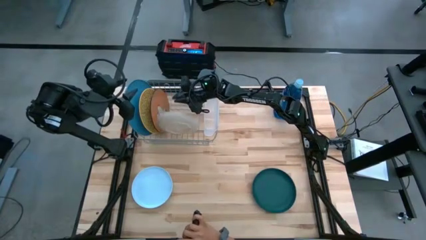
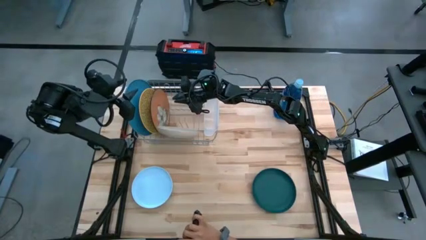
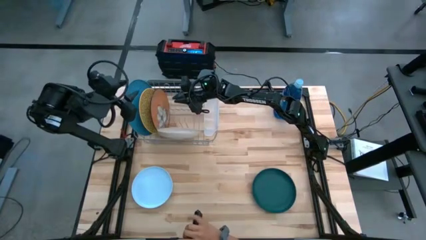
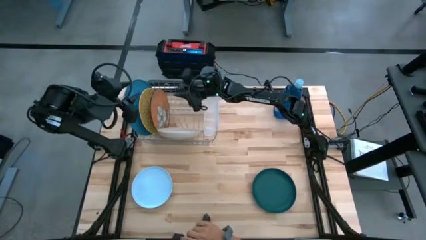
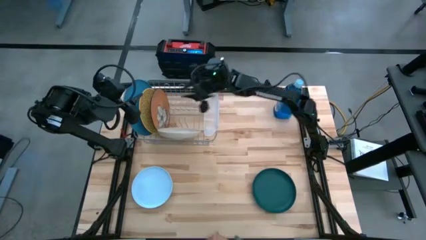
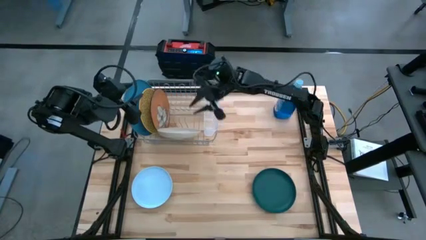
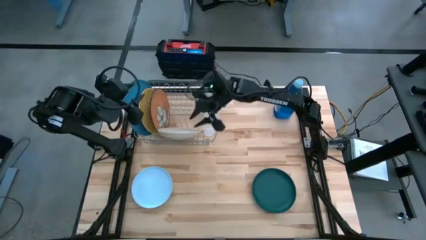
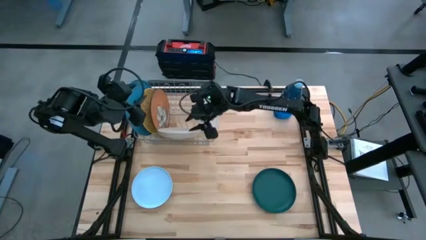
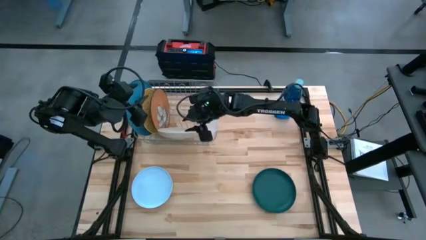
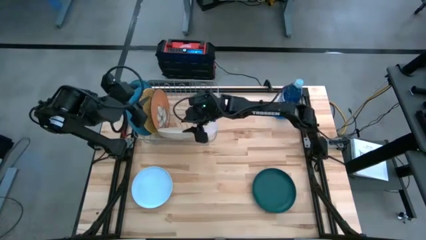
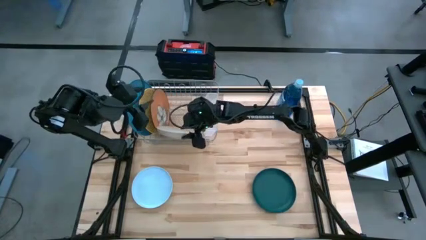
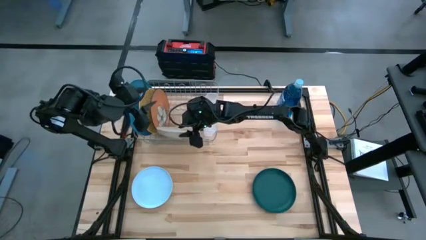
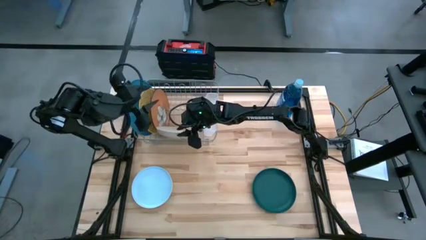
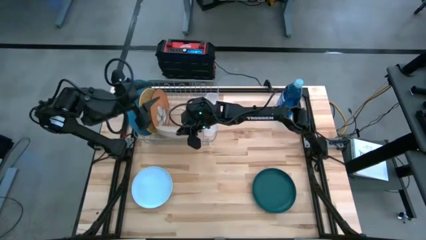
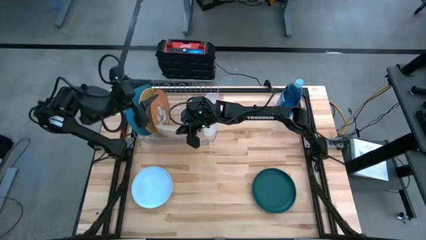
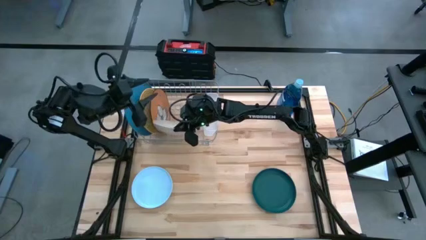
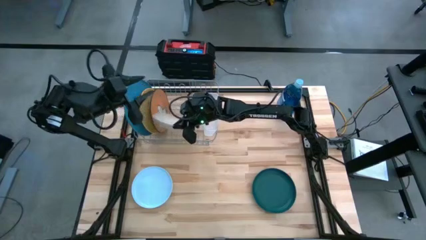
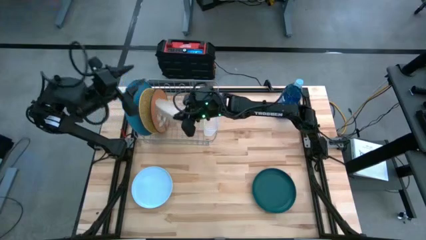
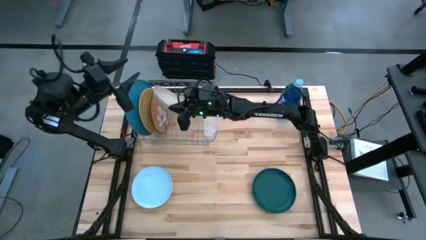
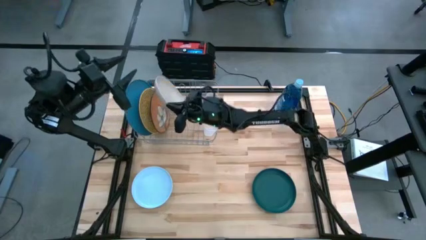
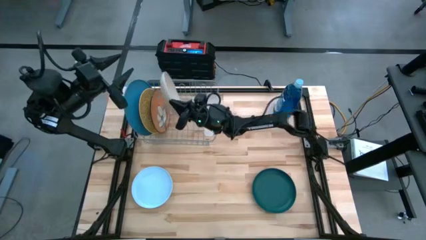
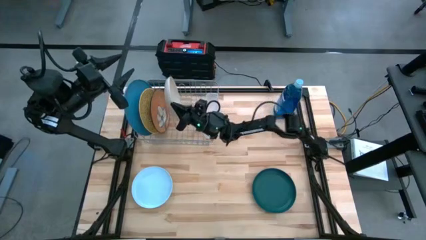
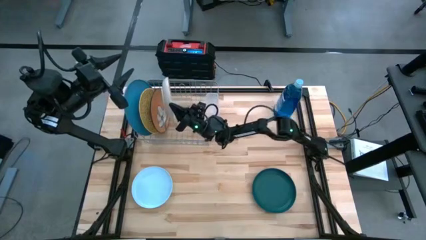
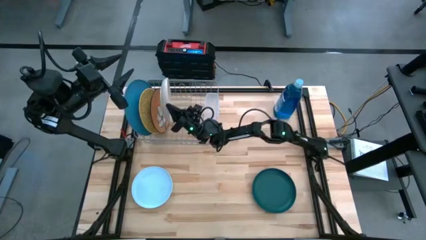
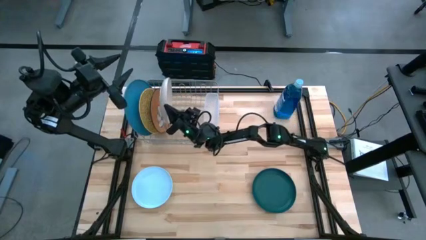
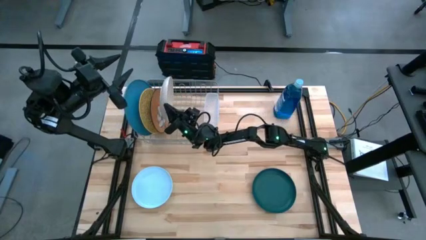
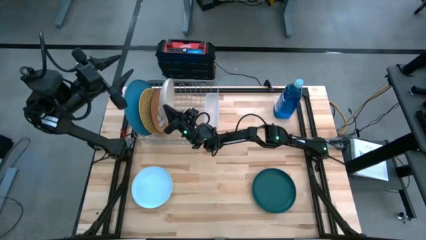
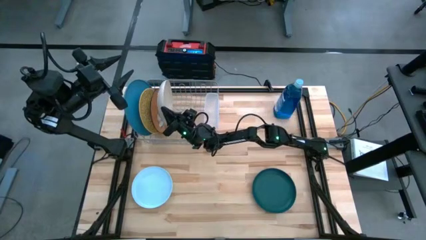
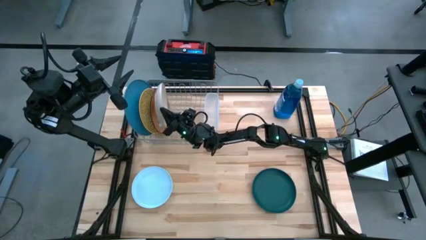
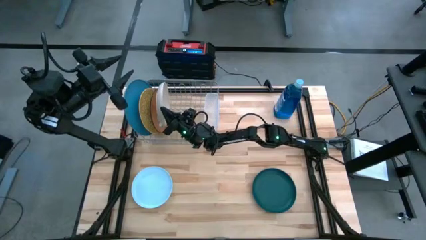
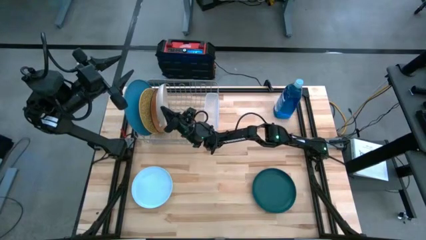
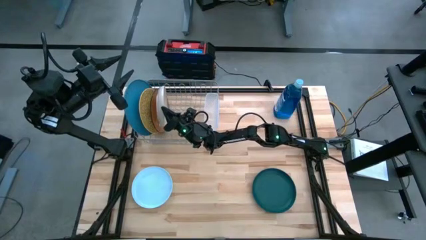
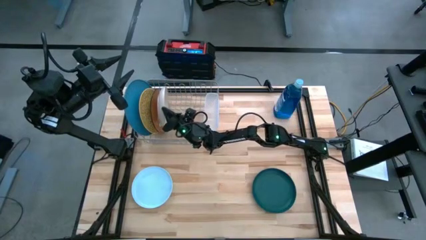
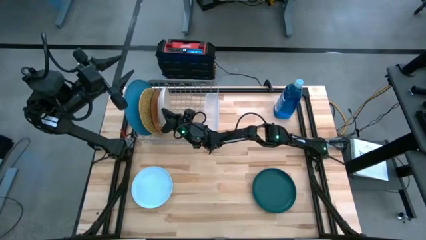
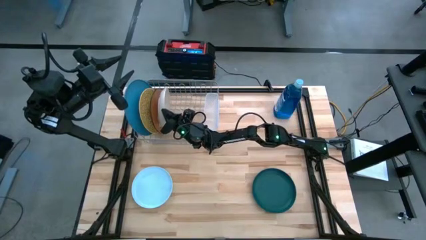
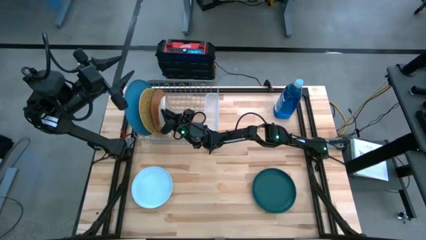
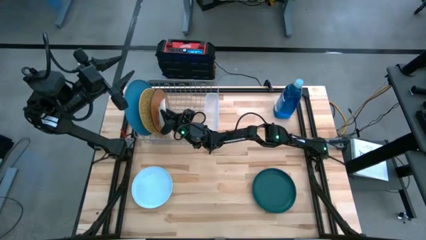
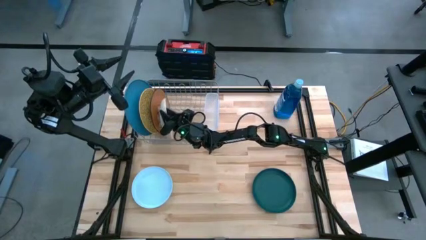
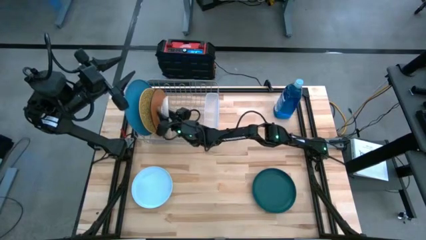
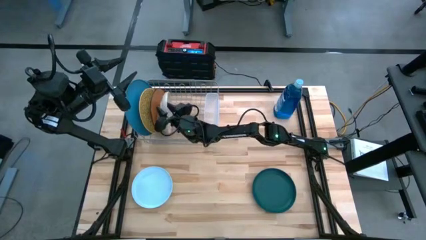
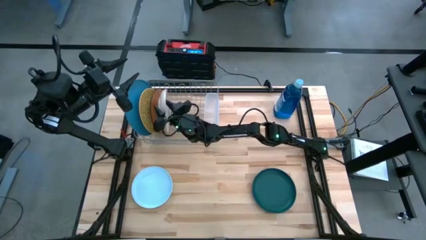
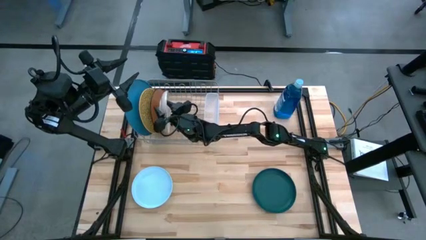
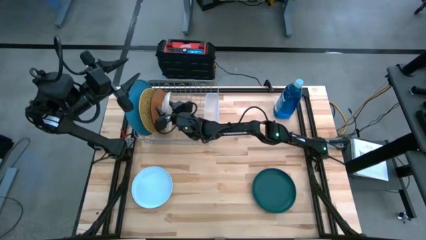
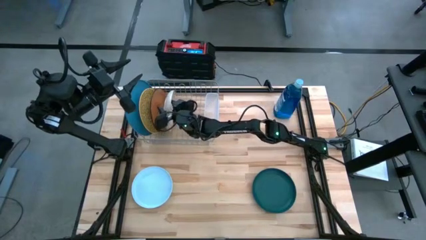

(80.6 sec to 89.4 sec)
Task: Sort dishes
Put the gray plate in the dish rack

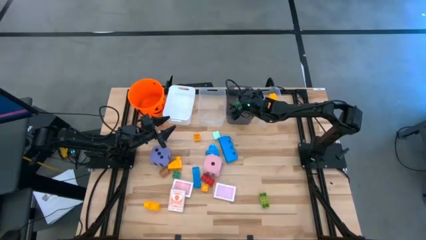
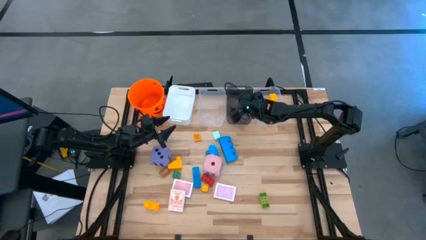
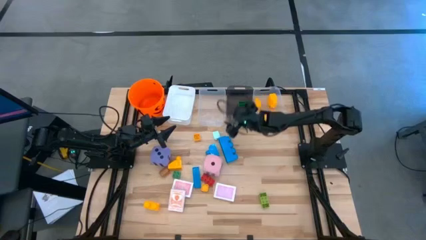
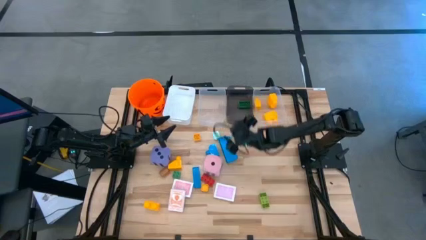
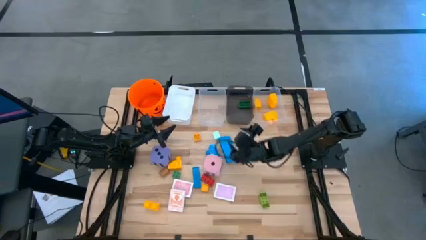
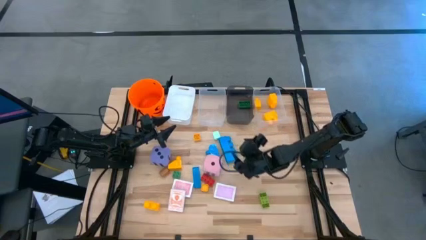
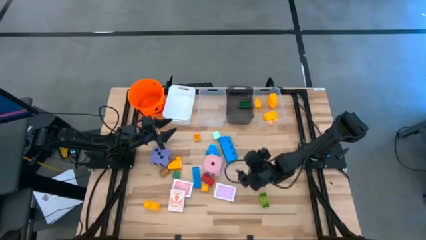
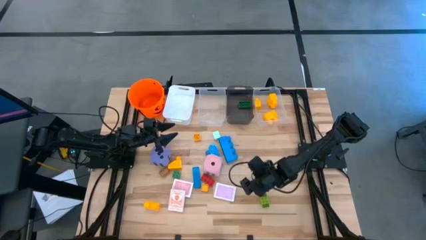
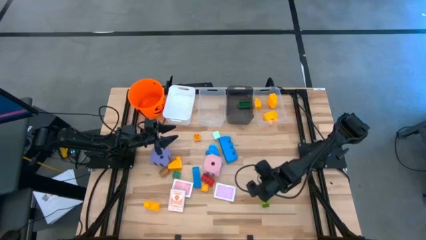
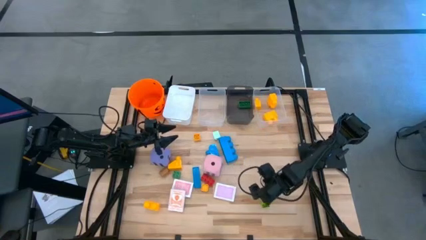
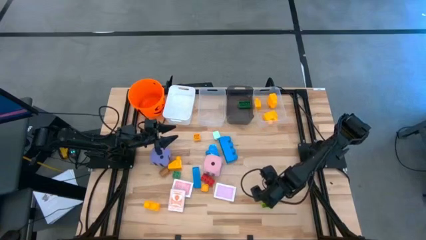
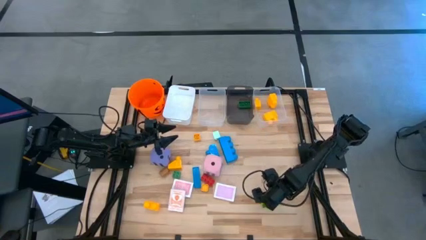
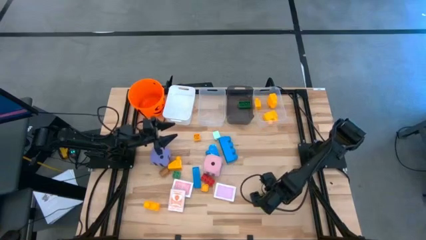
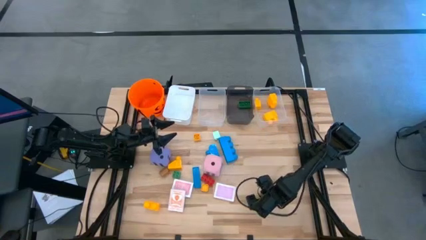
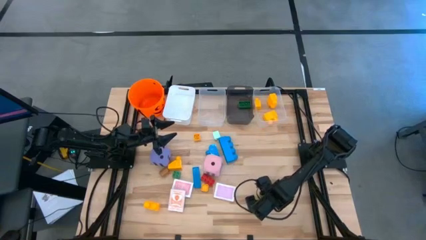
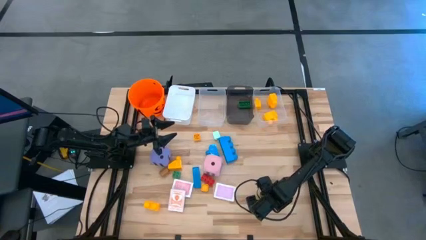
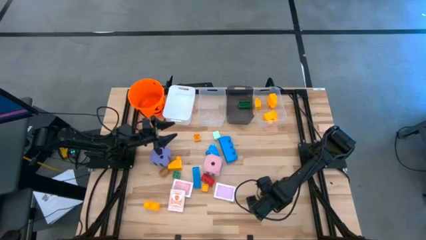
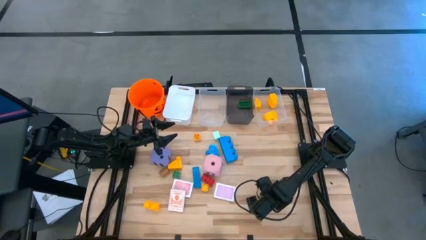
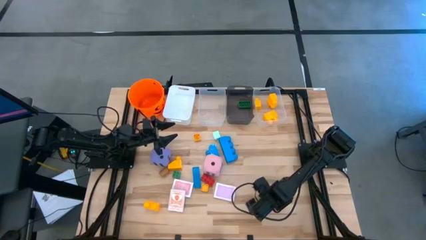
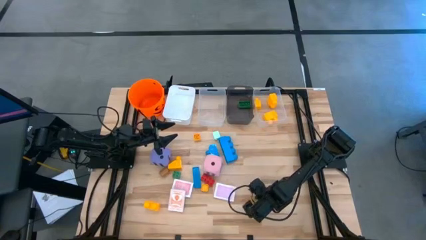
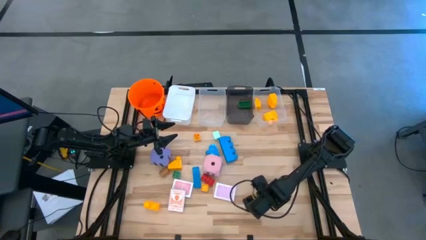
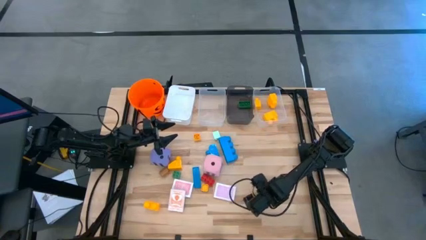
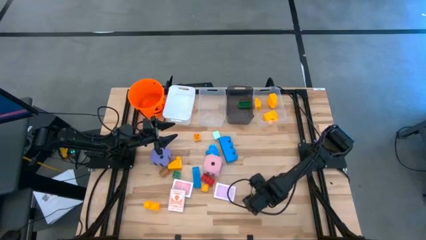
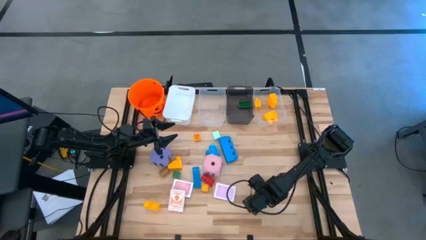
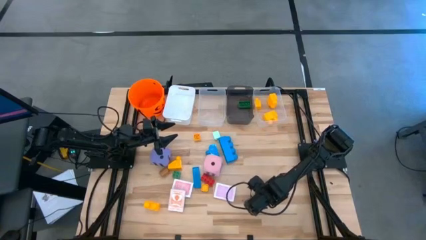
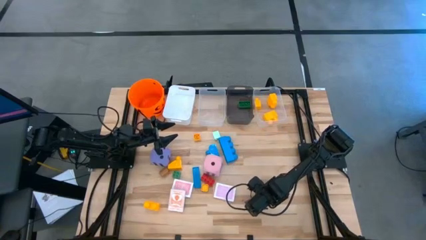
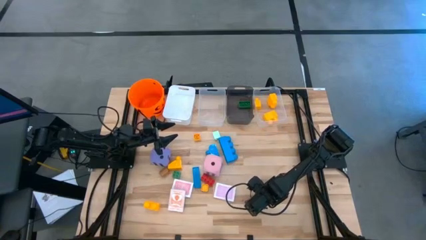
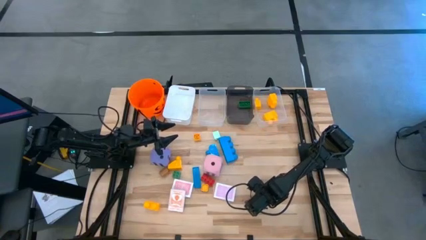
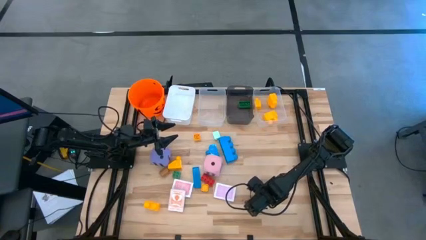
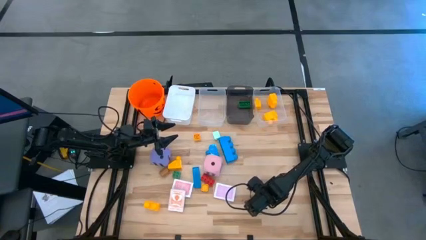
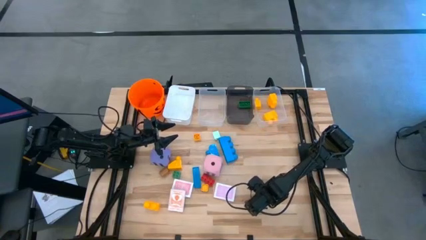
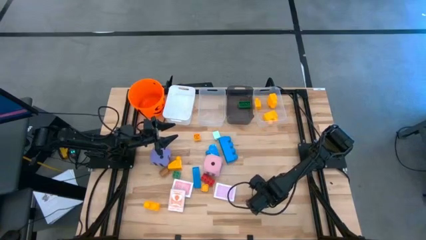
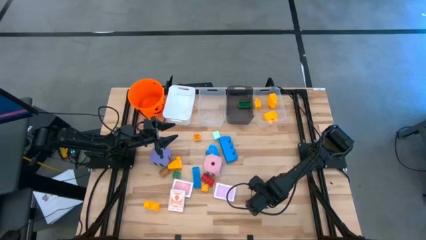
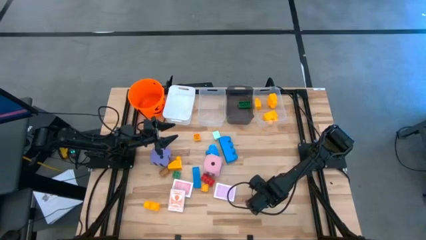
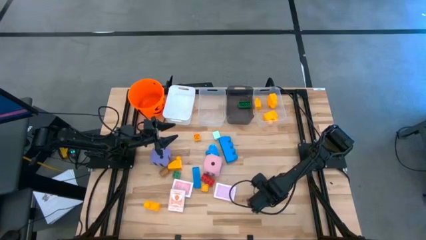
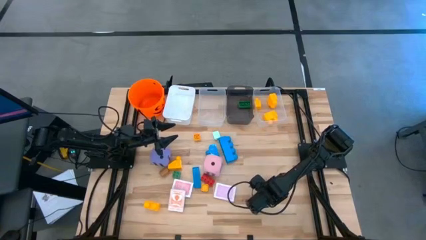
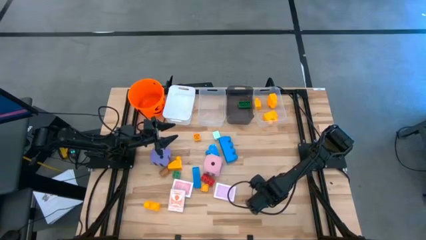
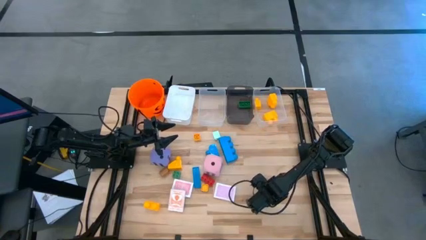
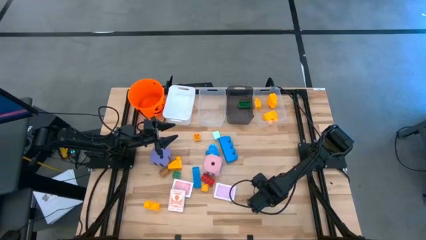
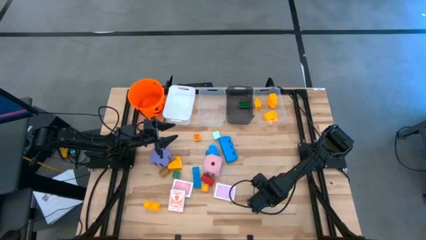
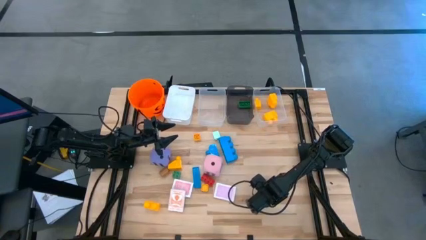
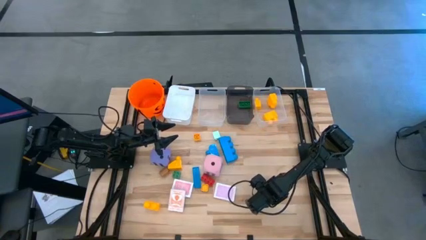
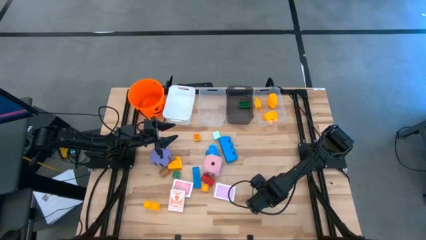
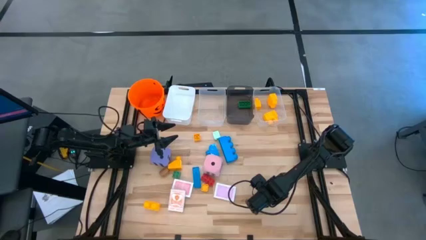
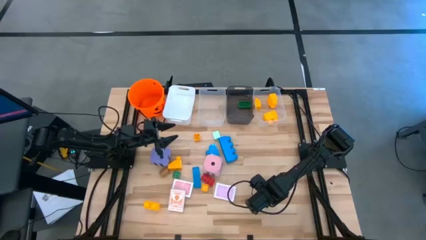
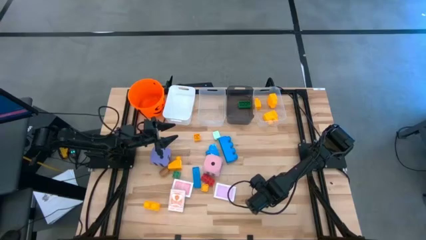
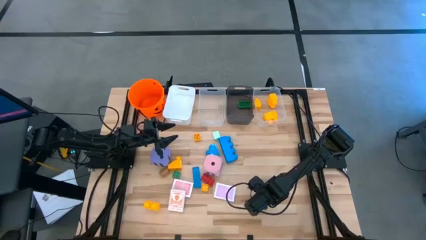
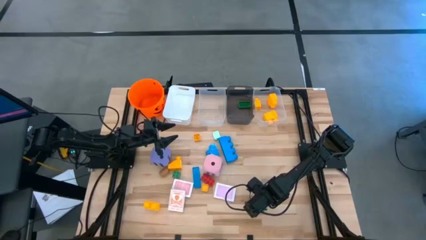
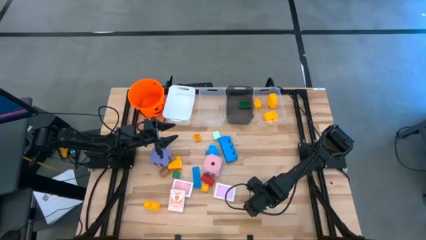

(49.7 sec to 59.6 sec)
Task: Pick & Place Toys
Put the small light green game piece into the black bin
